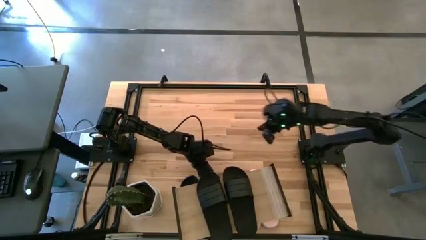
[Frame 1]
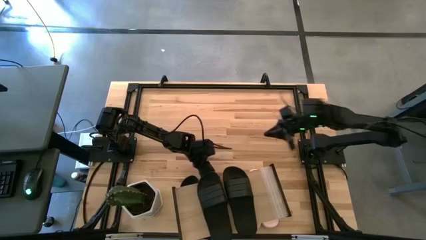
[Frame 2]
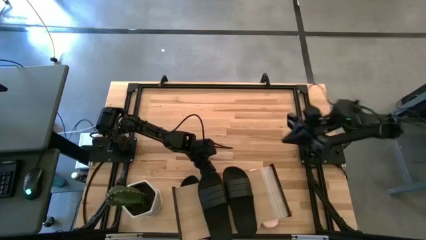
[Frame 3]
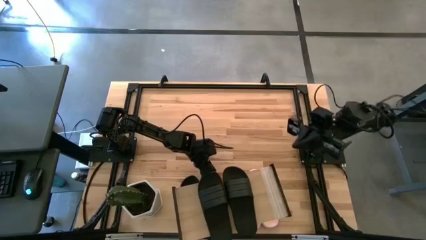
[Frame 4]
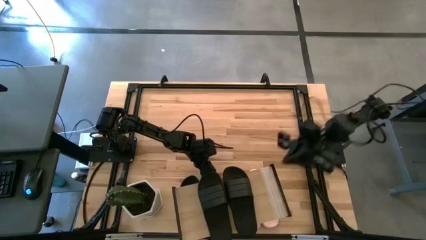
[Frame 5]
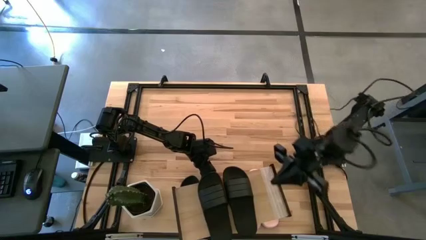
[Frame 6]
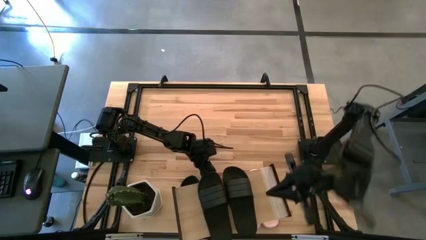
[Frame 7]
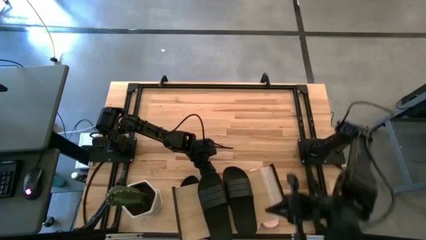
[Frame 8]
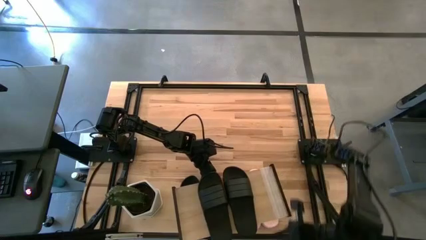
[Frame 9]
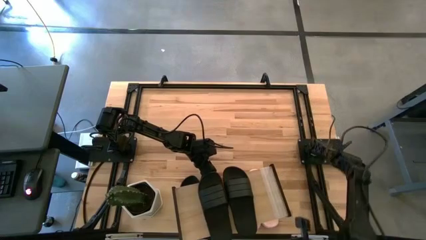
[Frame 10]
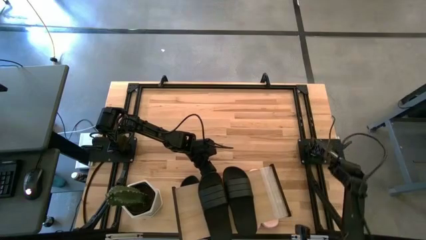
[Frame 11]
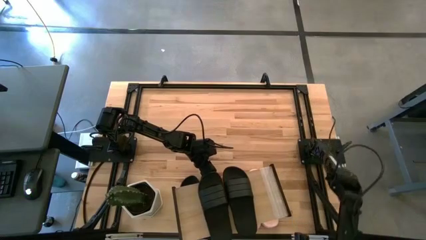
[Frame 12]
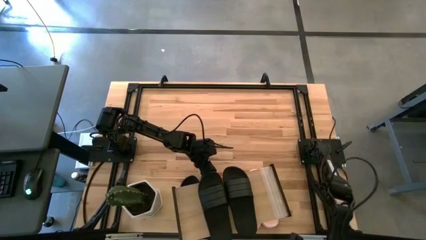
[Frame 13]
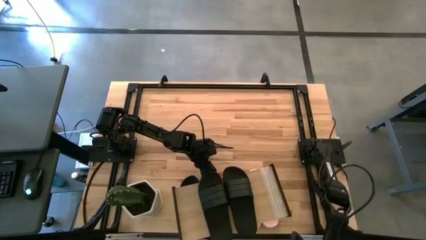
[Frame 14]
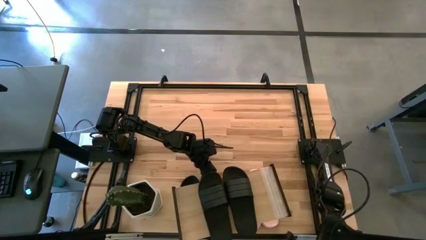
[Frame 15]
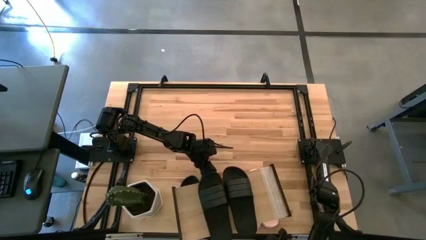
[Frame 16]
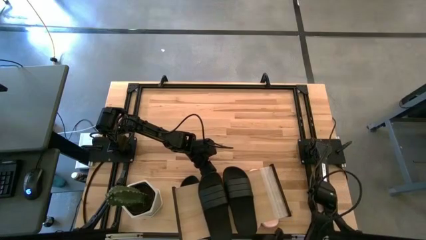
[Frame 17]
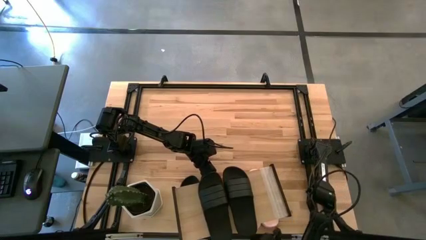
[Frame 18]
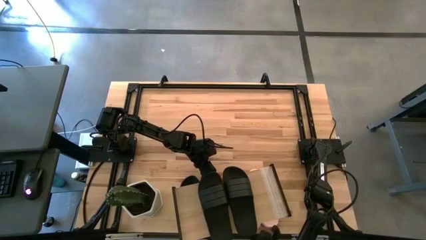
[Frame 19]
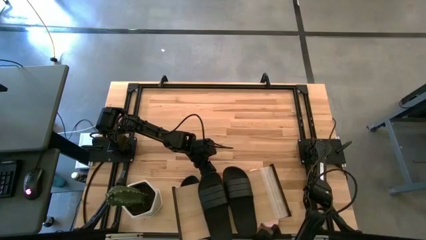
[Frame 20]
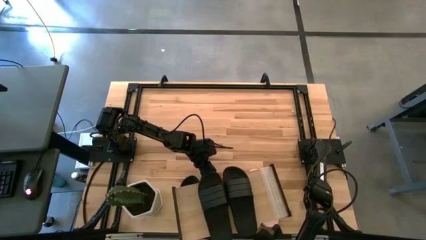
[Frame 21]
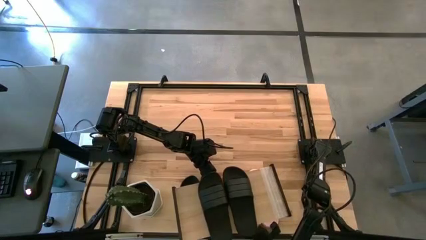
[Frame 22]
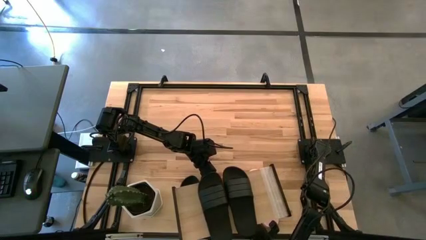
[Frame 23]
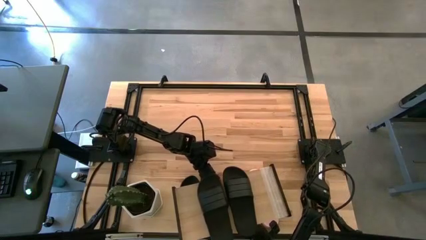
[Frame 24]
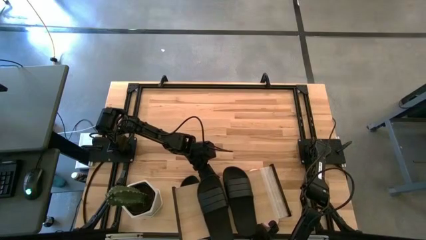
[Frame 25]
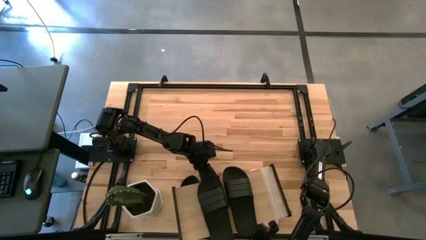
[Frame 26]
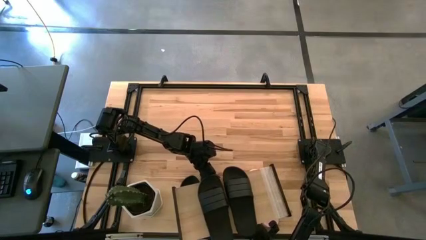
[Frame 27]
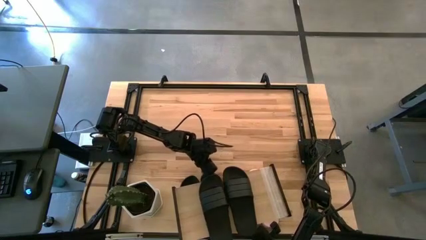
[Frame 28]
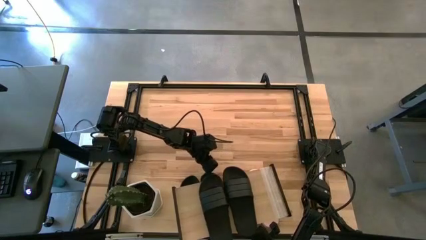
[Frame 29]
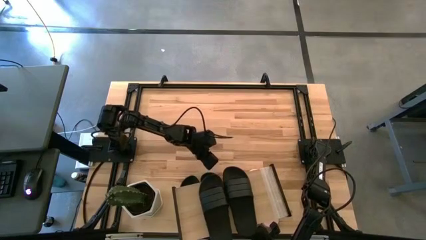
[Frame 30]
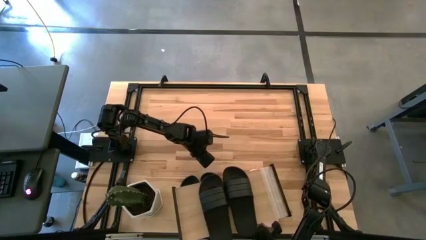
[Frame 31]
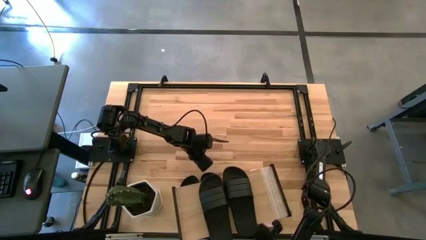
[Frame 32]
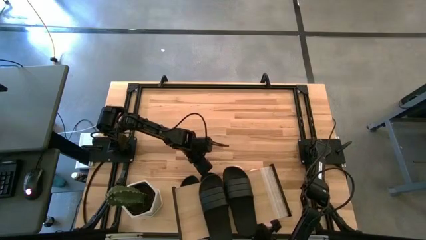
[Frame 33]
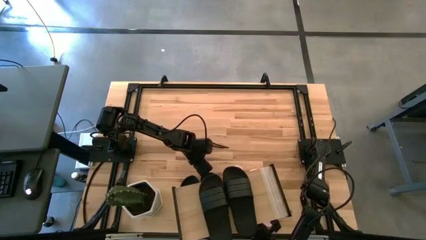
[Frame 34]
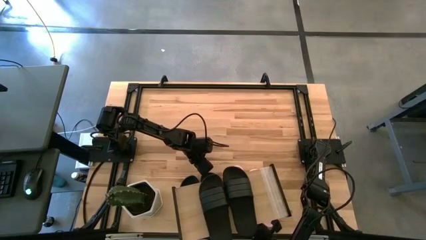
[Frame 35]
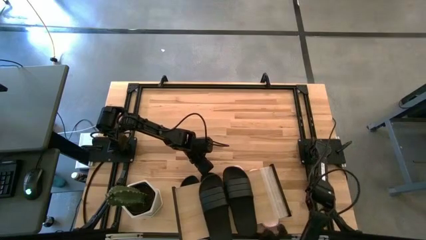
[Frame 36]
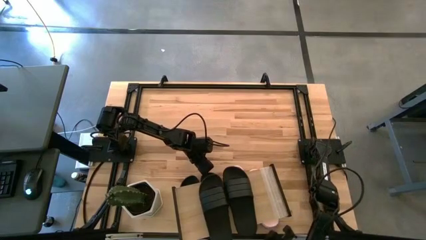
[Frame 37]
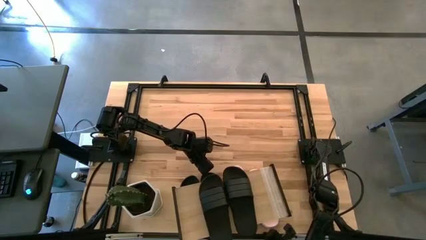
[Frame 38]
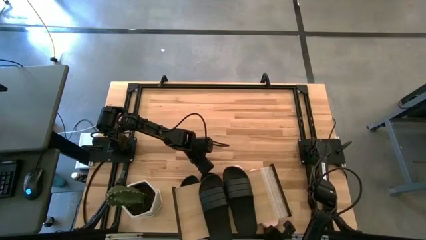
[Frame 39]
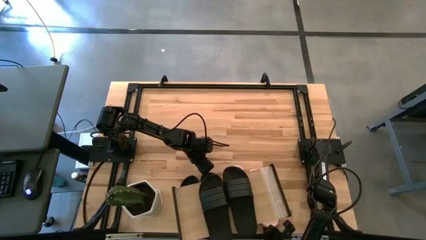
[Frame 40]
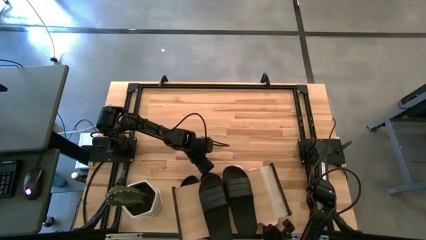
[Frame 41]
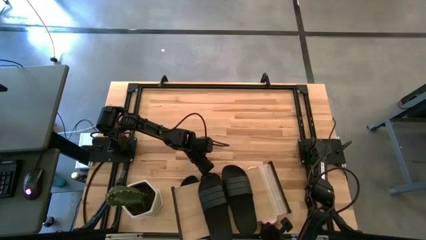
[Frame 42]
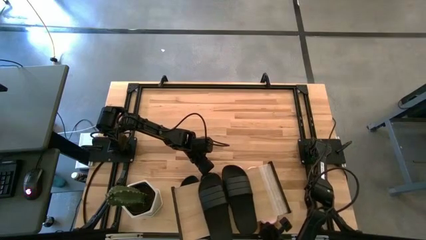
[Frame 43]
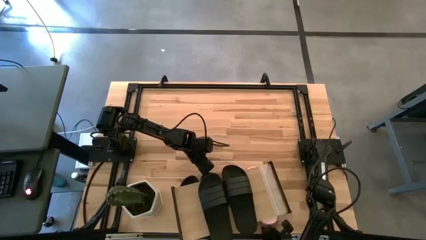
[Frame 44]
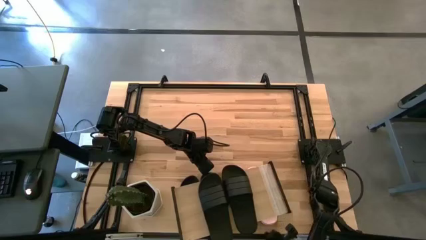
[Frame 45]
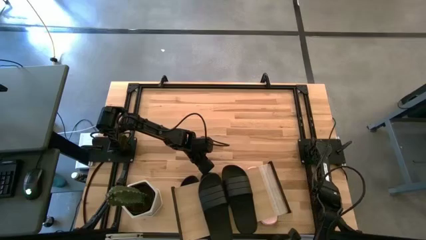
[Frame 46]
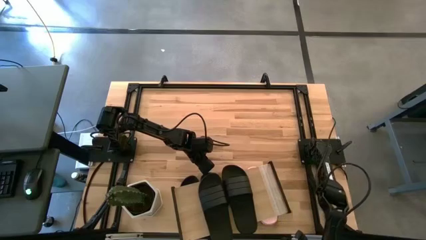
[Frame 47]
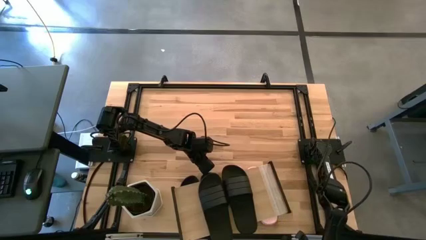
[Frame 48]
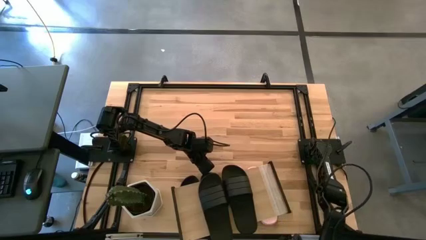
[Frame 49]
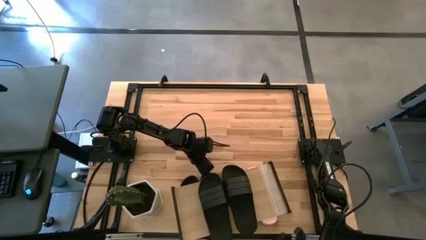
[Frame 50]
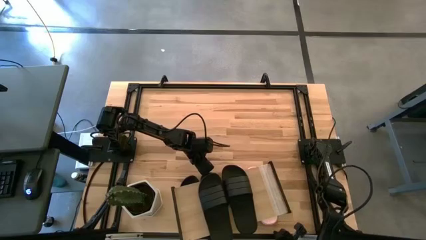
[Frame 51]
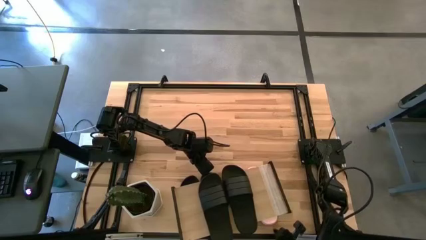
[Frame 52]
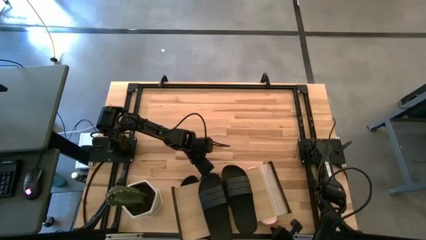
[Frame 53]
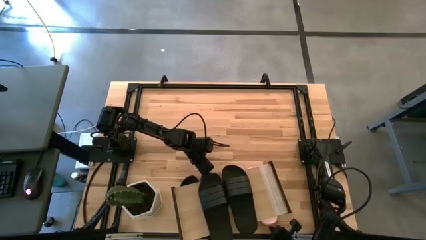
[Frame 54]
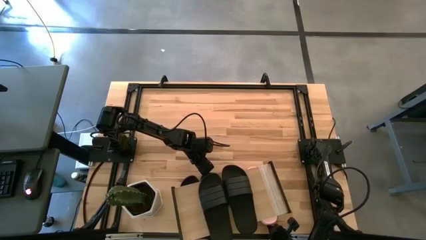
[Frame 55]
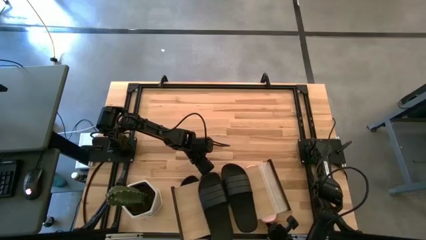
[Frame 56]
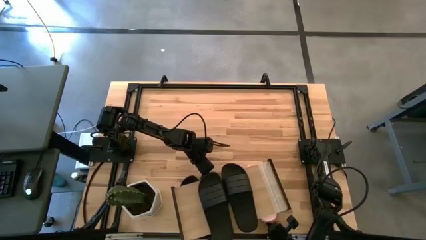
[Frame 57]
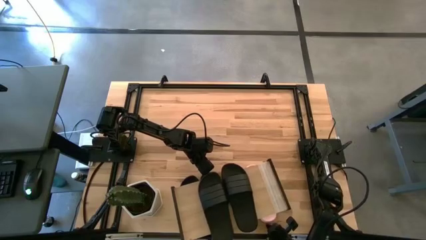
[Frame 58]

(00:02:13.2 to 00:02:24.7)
Task: Pick and place slides into the shelf
Adjust the slippers under the shelf
